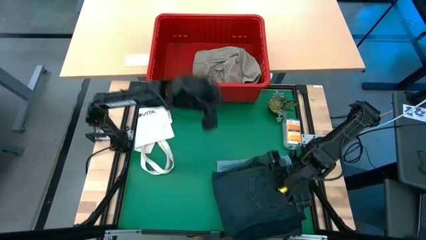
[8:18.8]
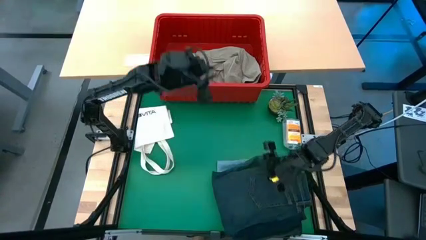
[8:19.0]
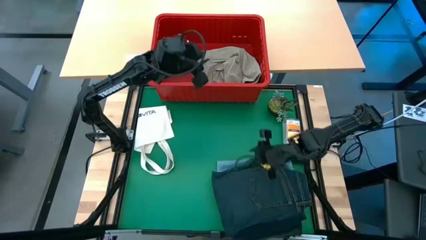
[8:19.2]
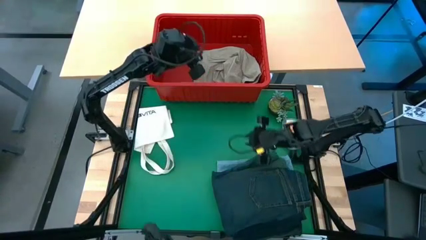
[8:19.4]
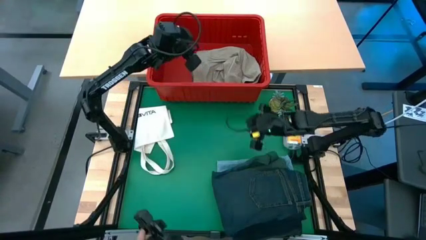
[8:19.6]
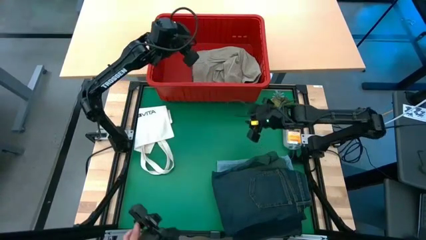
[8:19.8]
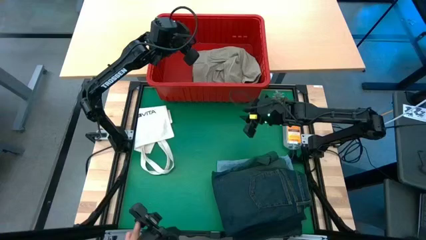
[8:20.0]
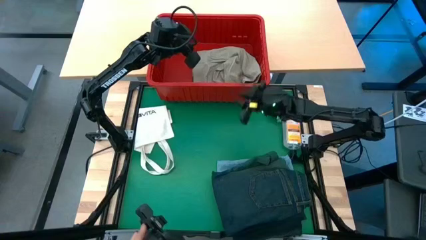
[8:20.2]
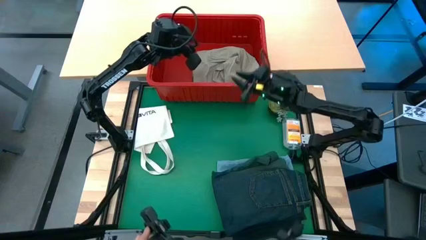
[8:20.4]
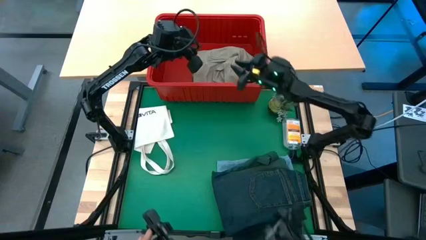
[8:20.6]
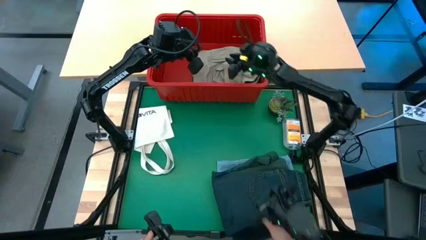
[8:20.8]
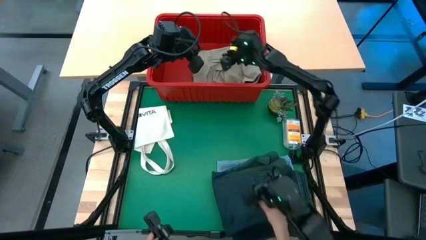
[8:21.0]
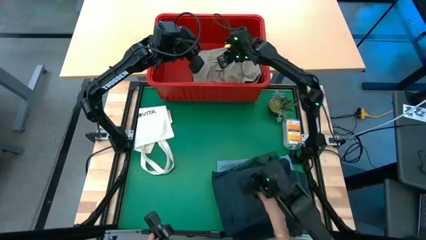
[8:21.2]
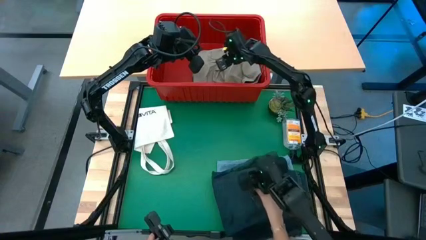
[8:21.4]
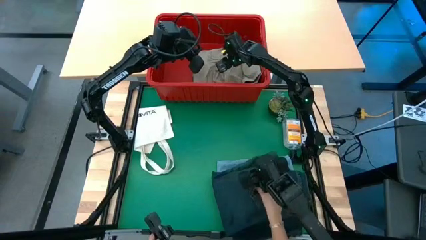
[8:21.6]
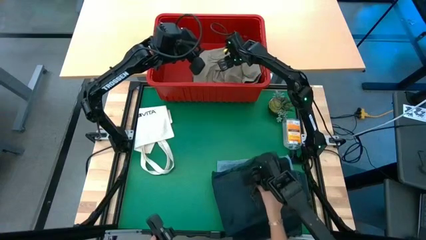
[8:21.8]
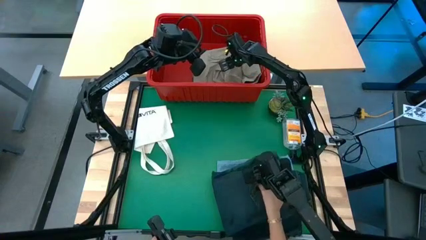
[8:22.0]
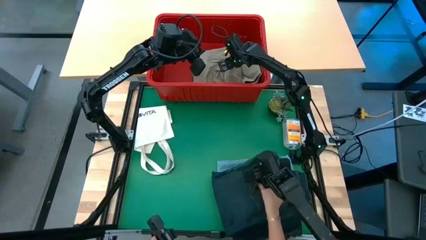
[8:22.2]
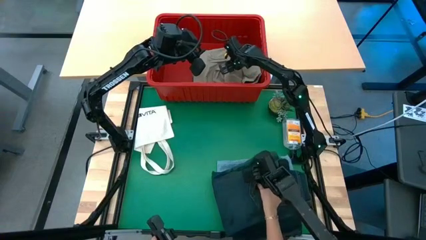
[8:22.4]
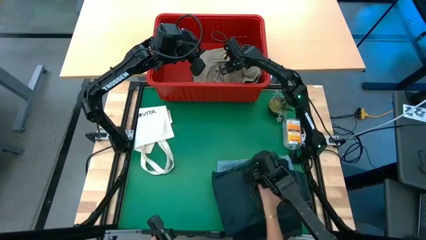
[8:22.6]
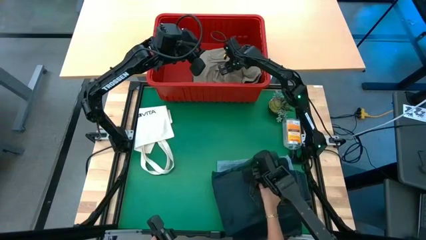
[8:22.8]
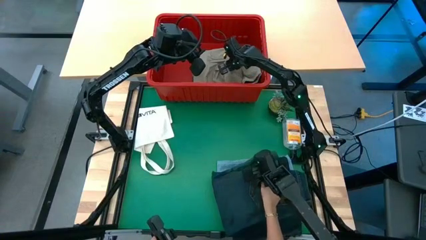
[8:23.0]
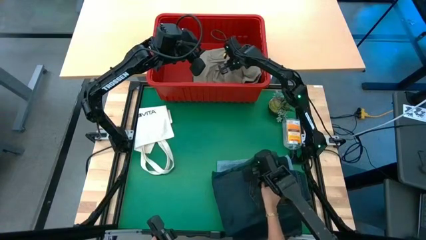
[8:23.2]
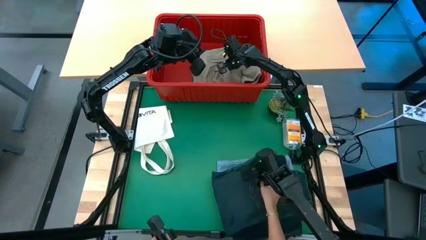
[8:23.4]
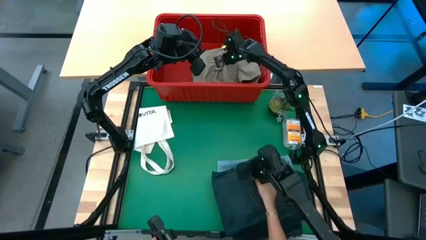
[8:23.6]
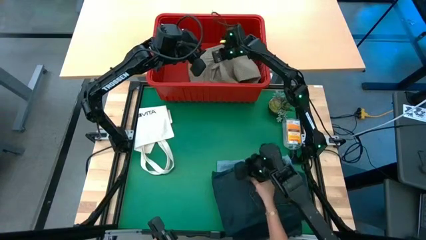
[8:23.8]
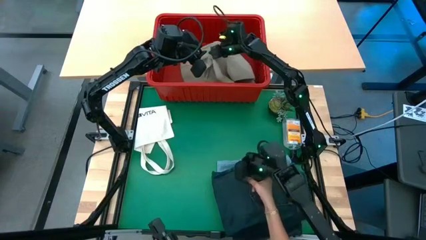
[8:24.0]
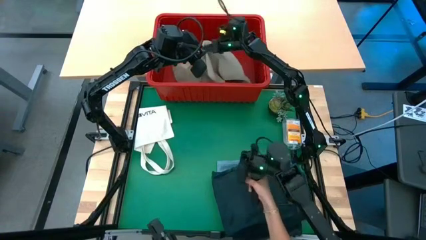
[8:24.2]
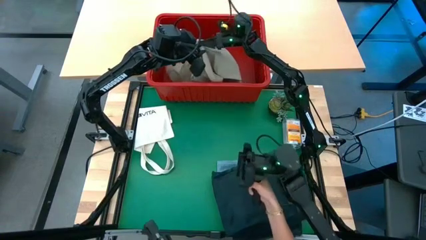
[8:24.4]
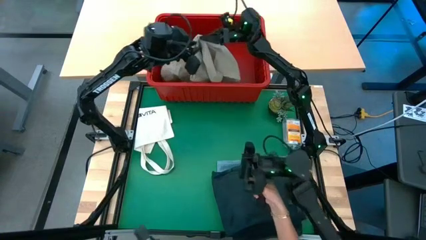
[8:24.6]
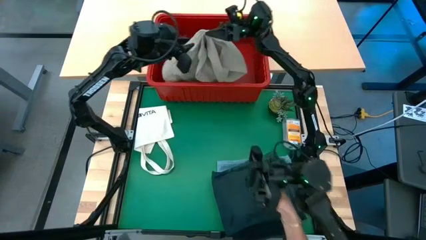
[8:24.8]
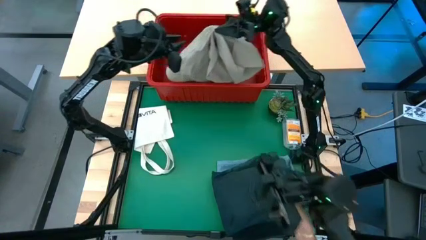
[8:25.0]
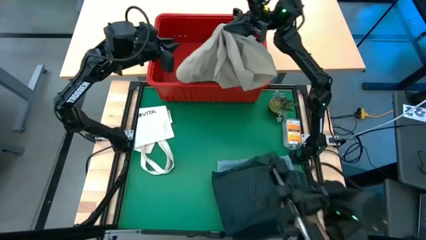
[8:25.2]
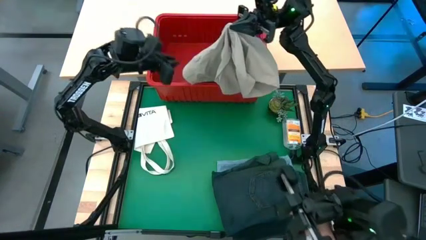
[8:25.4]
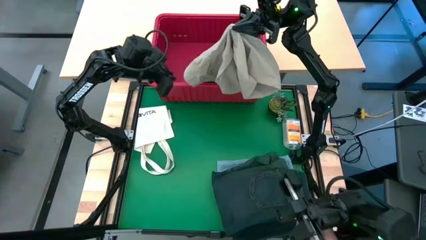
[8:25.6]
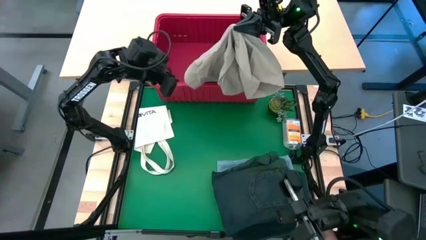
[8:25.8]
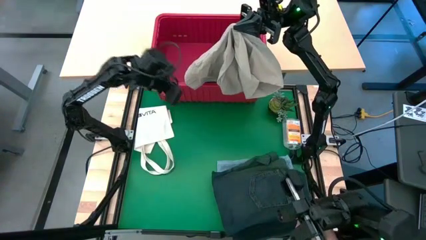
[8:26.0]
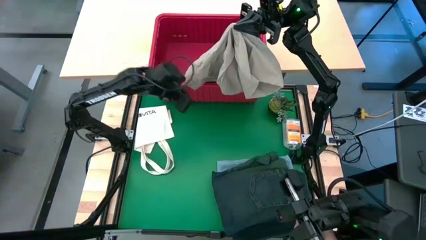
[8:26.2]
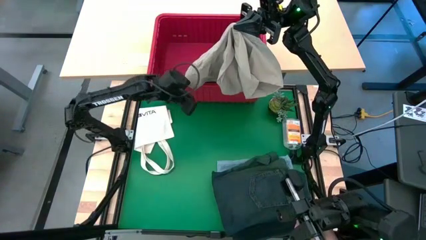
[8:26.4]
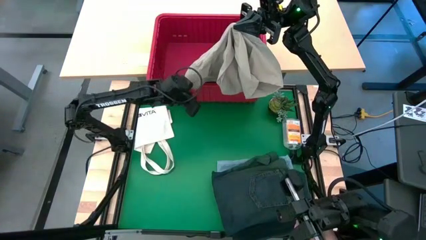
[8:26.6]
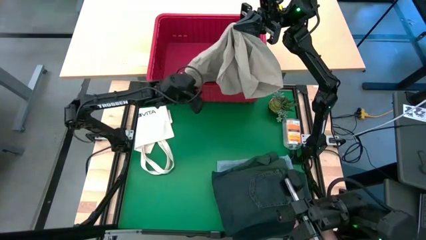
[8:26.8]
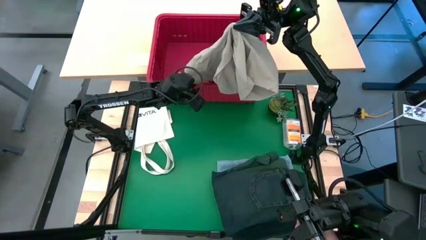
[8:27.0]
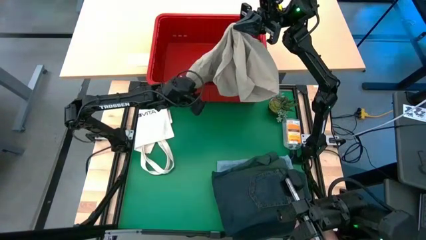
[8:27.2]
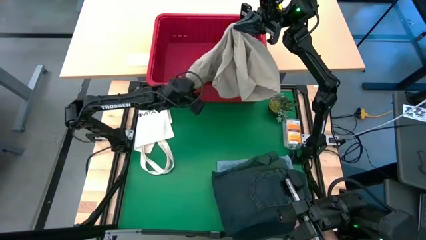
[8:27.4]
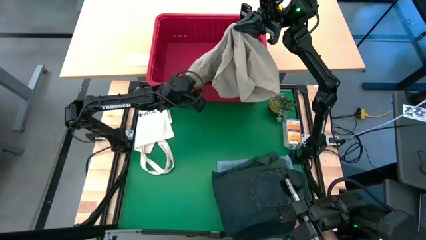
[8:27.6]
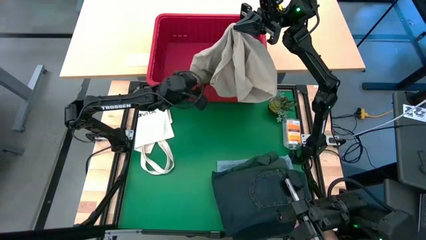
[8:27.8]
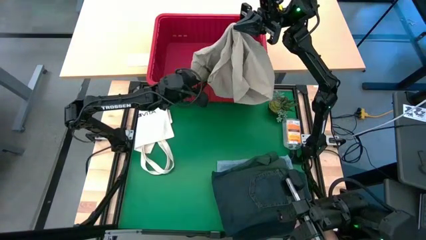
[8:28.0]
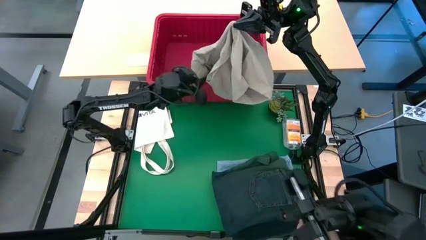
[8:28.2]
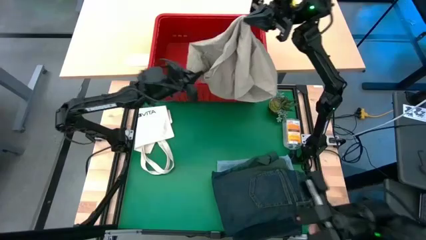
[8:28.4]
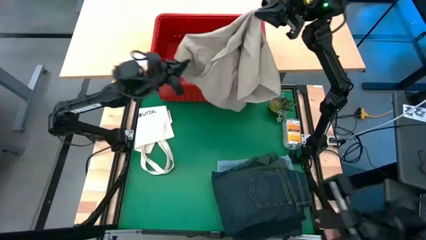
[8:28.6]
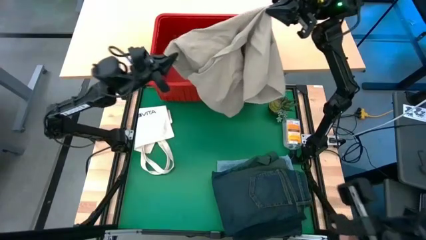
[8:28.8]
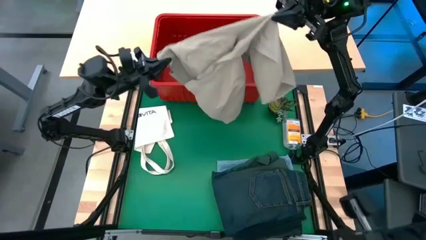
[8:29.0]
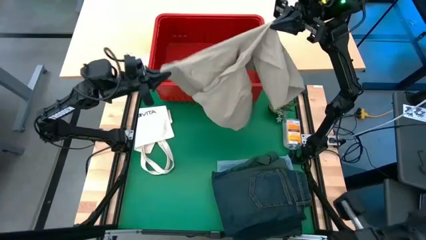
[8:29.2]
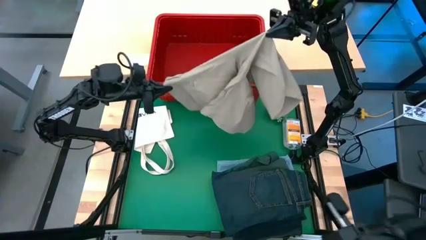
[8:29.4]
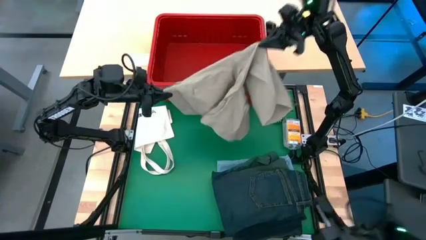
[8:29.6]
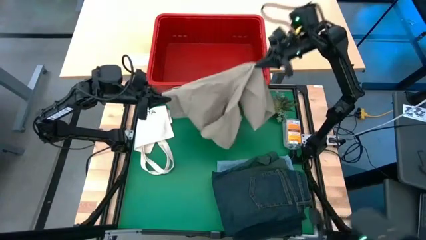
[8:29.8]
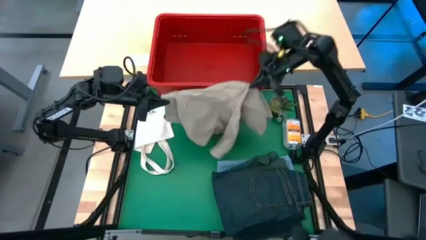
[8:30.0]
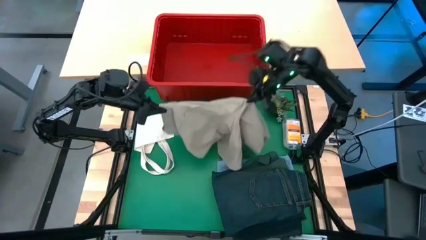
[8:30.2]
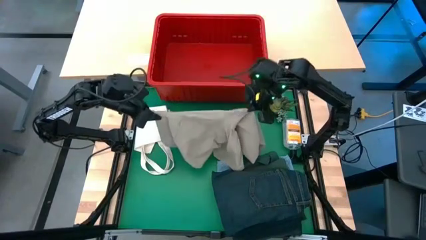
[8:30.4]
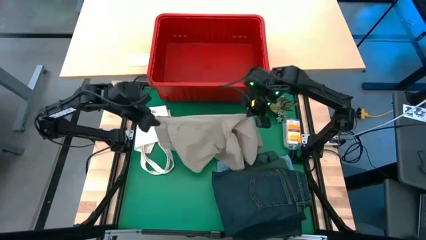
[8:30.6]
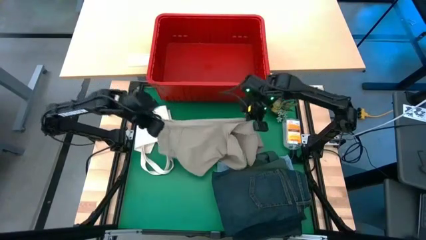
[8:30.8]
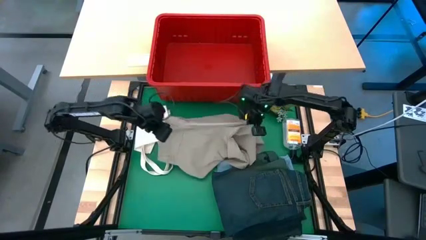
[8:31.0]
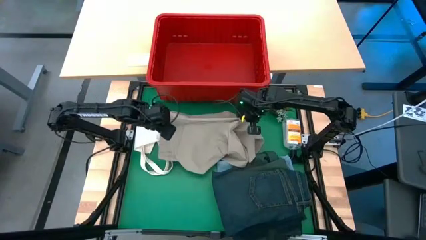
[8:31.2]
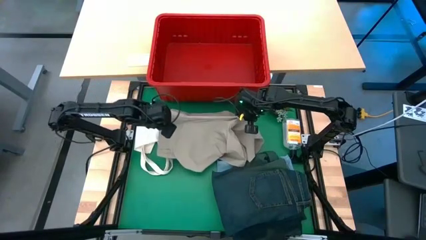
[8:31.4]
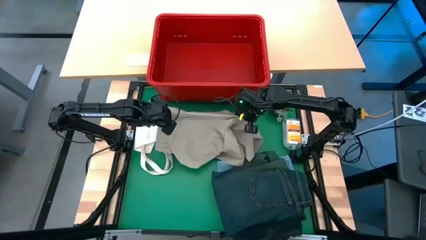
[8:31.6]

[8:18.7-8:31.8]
Task: Fold Laundry from Bin
Remove the brown shorts from the red bin

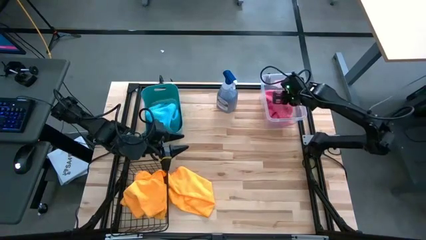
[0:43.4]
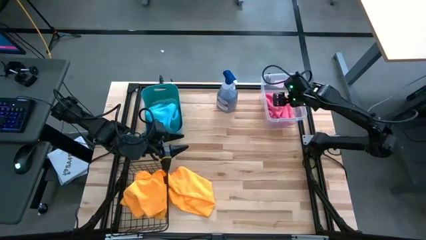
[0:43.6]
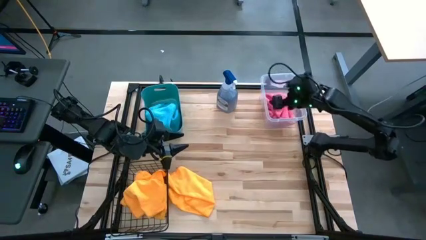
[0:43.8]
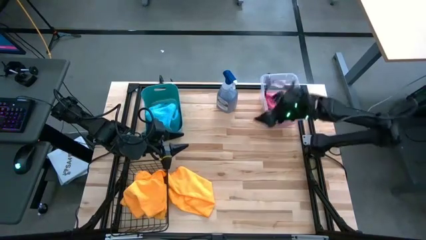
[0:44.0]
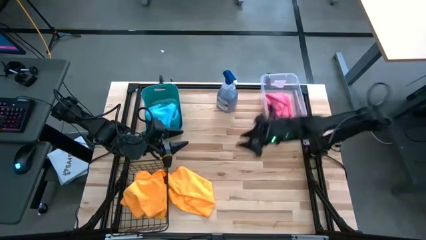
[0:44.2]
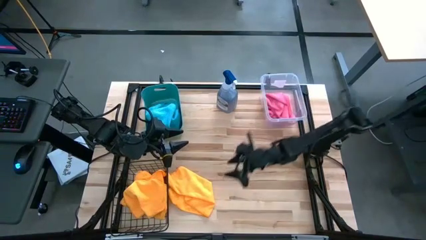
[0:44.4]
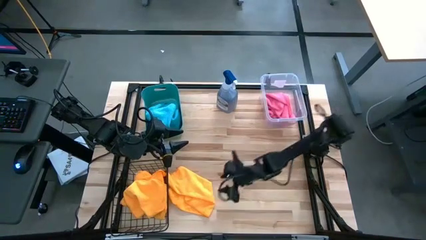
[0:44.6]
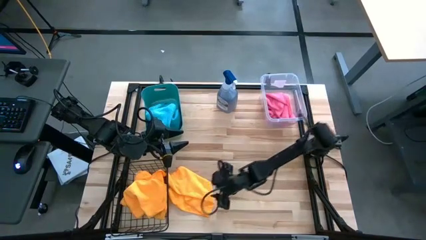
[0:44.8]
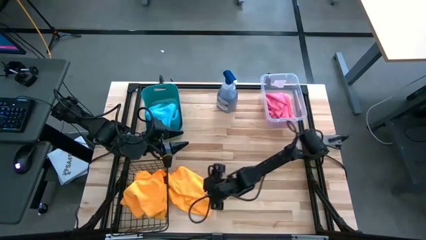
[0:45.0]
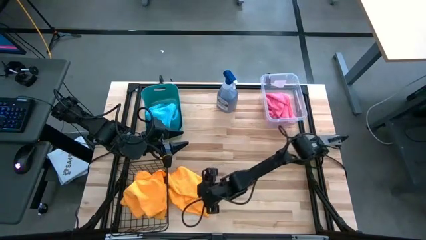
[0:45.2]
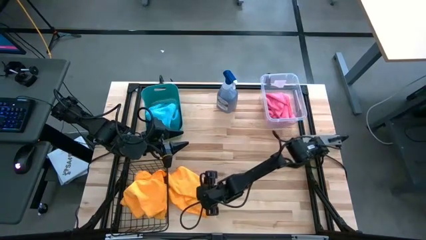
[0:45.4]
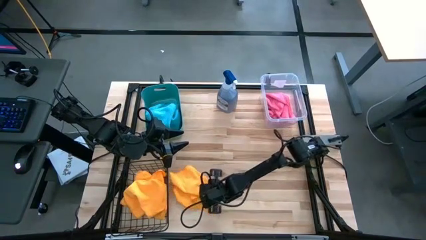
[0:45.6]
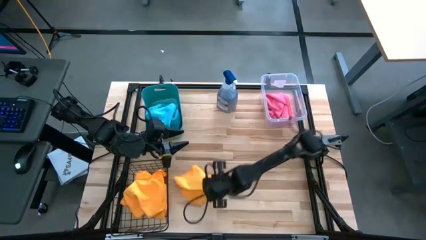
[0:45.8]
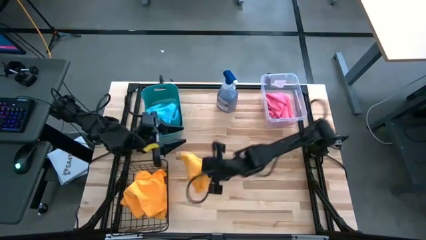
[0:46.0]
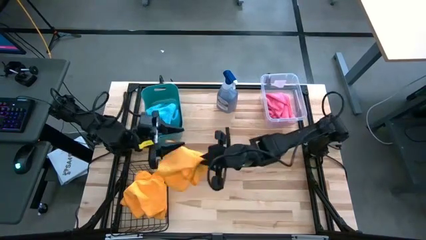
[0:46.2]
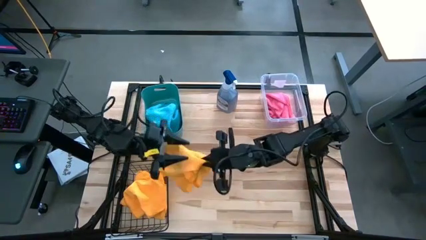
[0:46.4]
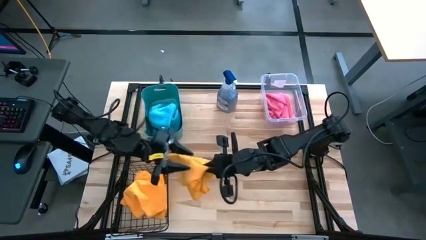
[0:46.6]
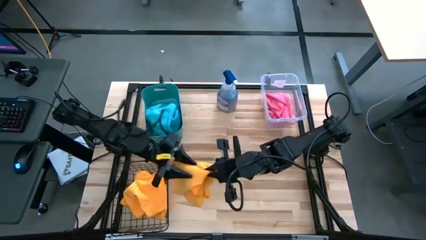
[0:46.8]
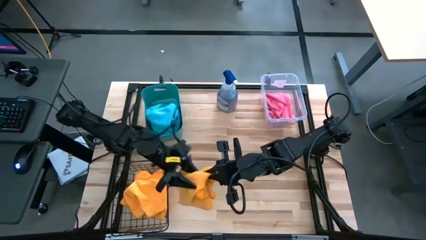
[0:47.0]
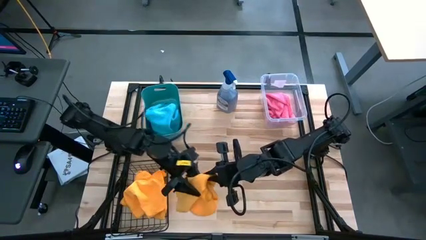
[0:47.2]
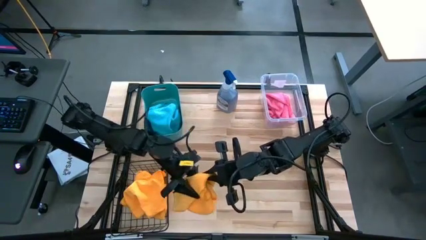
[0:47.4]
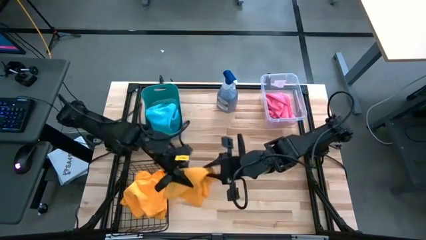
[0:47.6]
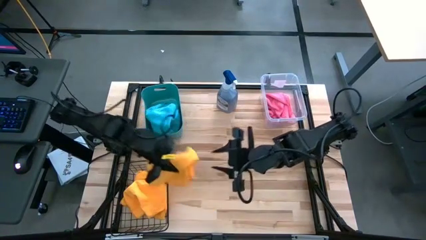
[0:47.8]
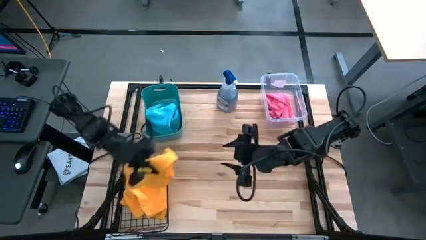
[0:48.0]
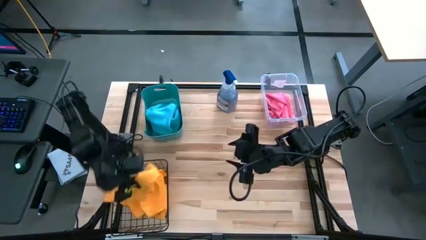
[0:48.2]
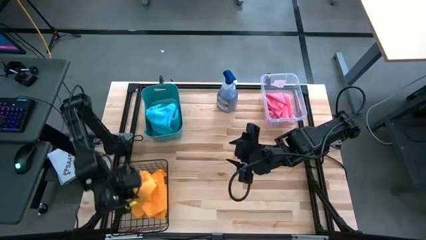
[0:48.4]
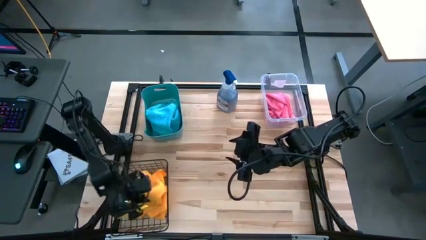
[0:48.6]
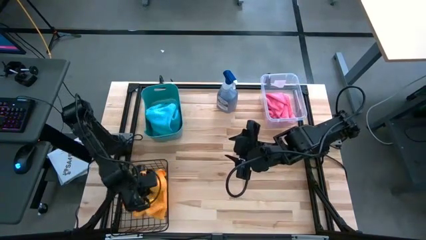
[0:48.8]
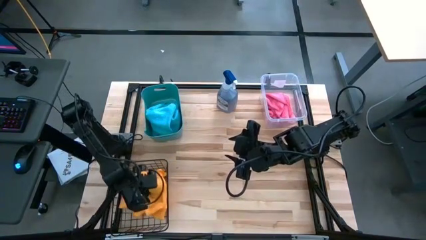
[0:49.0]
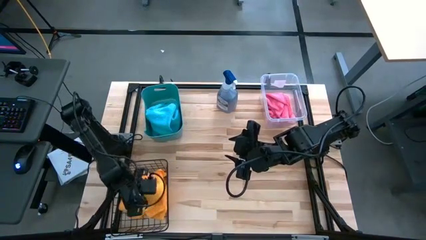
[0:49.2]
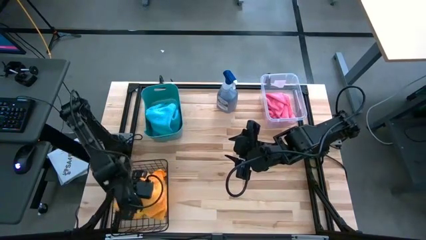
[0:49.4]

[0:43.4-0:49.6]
Task: Sort microfiber towel by color & place in baskets
Put the yellow towel in the basket
